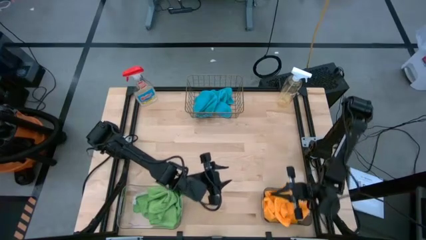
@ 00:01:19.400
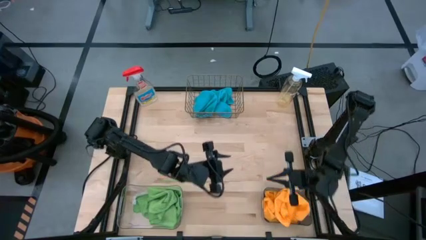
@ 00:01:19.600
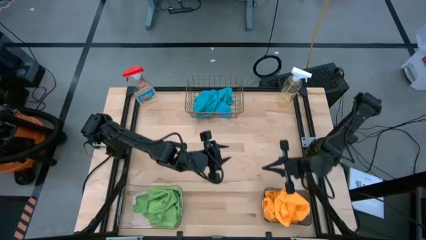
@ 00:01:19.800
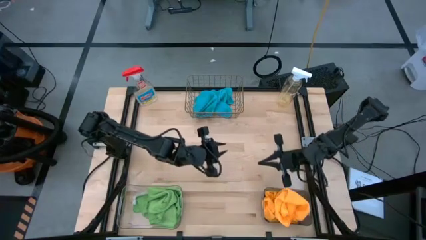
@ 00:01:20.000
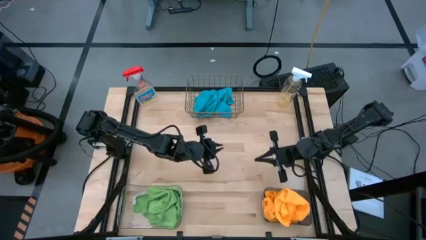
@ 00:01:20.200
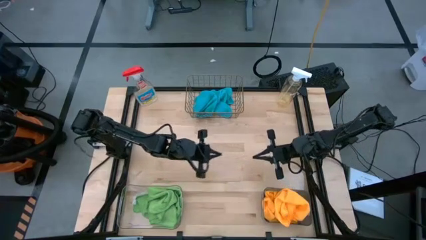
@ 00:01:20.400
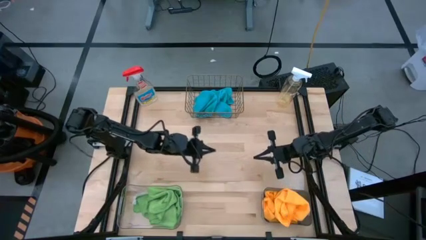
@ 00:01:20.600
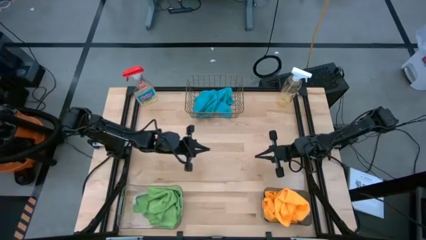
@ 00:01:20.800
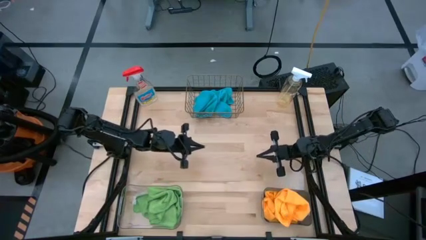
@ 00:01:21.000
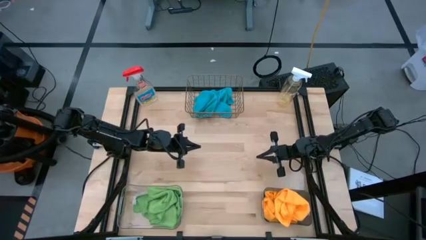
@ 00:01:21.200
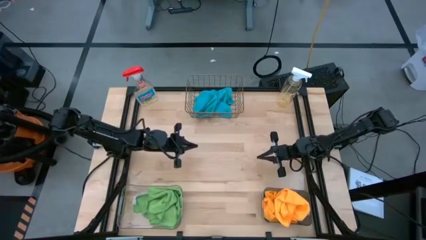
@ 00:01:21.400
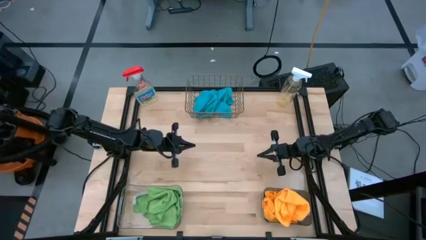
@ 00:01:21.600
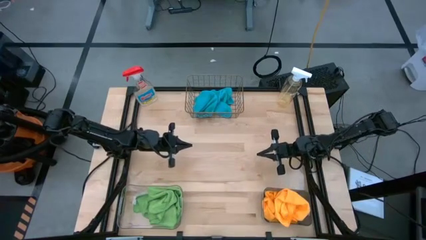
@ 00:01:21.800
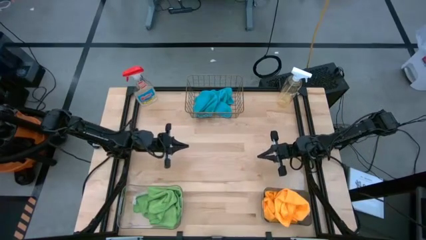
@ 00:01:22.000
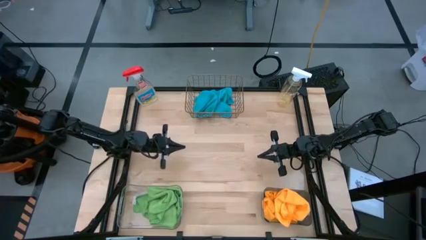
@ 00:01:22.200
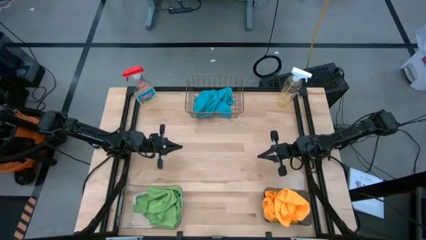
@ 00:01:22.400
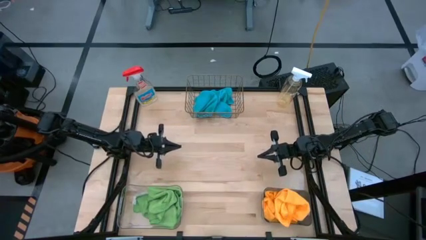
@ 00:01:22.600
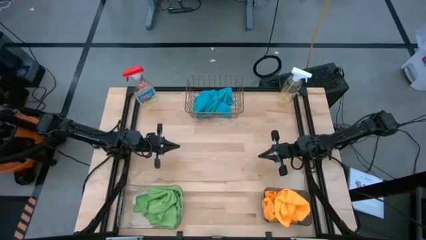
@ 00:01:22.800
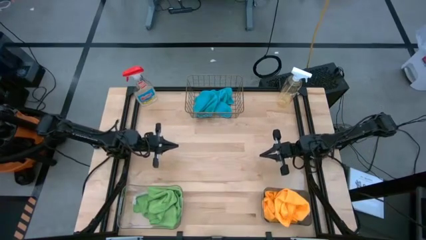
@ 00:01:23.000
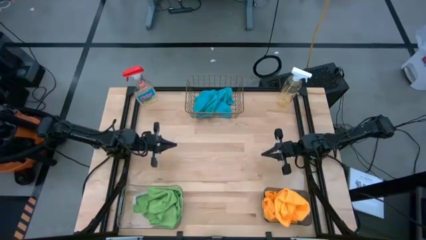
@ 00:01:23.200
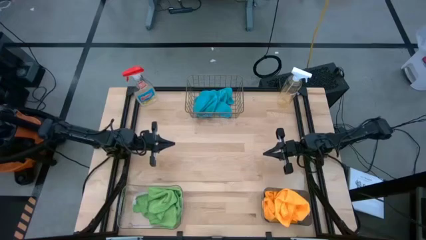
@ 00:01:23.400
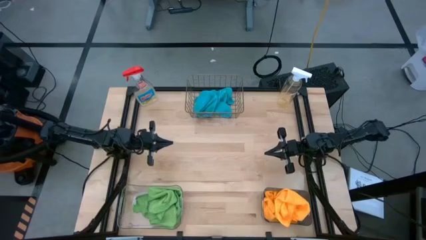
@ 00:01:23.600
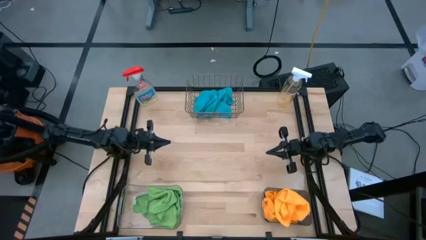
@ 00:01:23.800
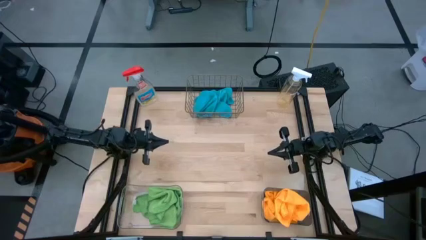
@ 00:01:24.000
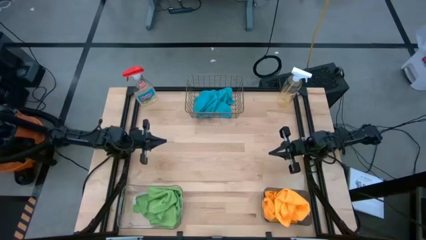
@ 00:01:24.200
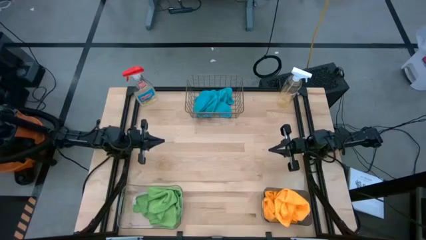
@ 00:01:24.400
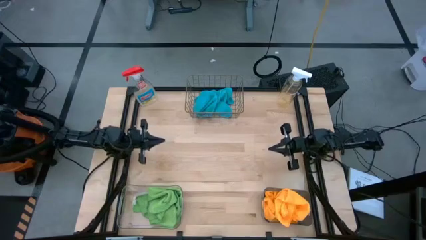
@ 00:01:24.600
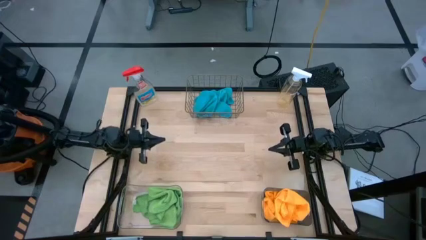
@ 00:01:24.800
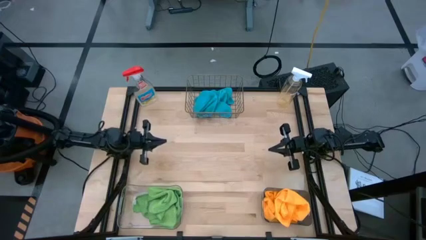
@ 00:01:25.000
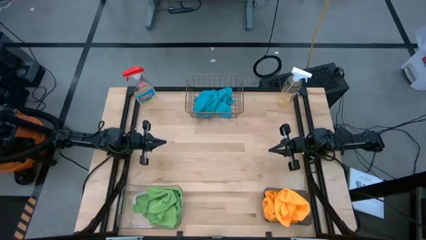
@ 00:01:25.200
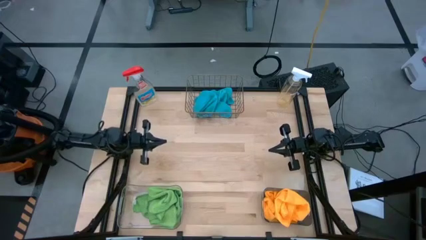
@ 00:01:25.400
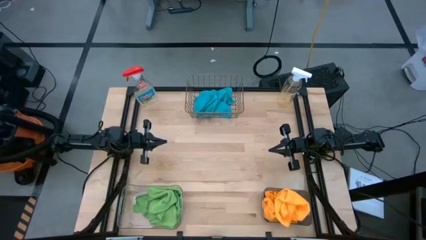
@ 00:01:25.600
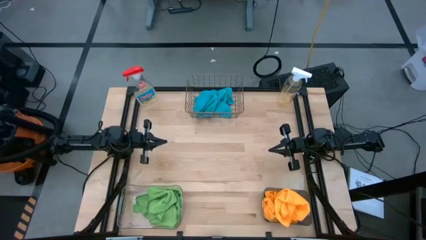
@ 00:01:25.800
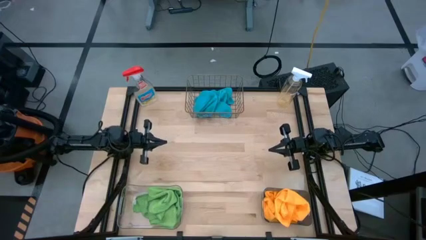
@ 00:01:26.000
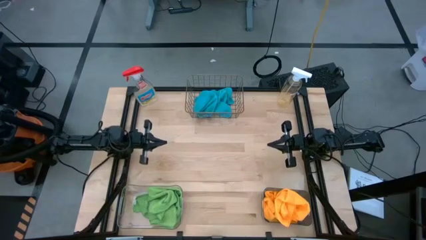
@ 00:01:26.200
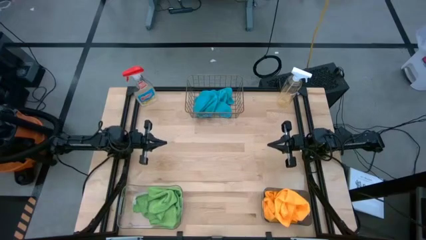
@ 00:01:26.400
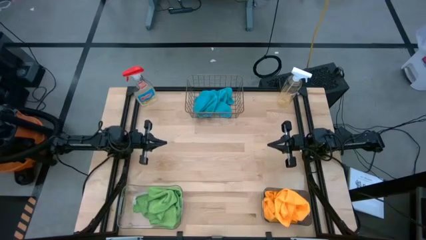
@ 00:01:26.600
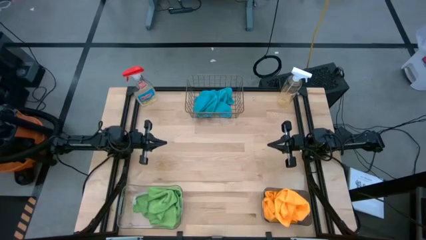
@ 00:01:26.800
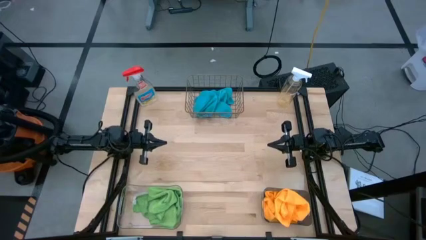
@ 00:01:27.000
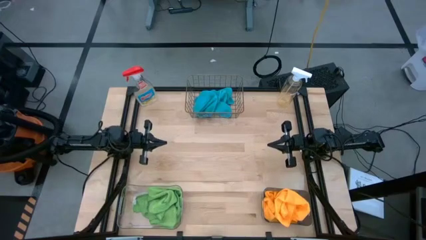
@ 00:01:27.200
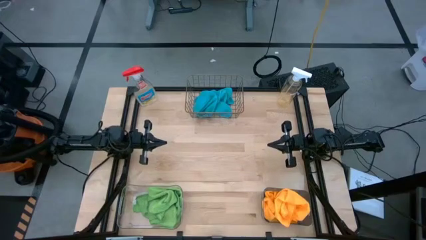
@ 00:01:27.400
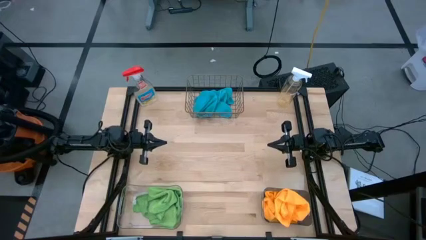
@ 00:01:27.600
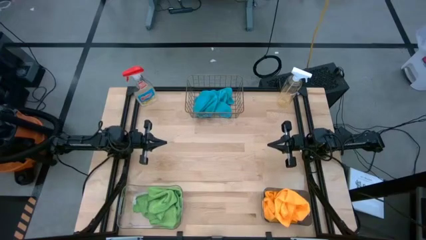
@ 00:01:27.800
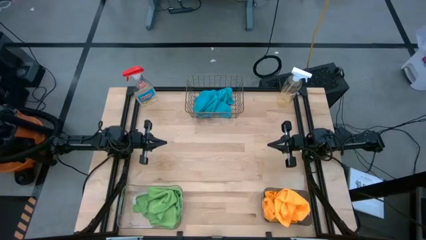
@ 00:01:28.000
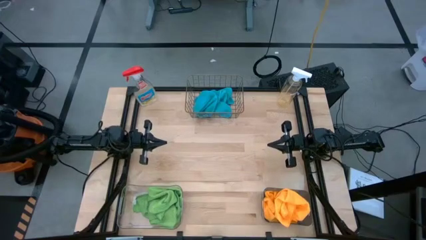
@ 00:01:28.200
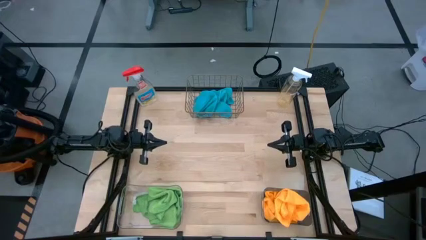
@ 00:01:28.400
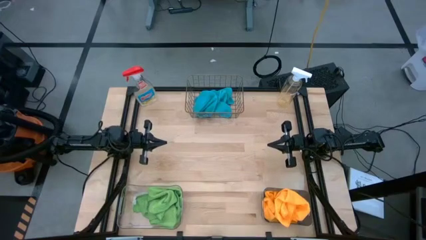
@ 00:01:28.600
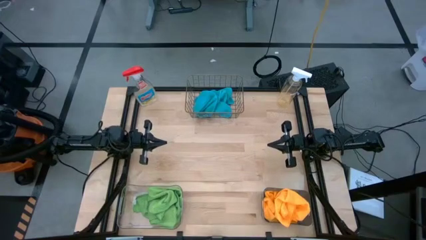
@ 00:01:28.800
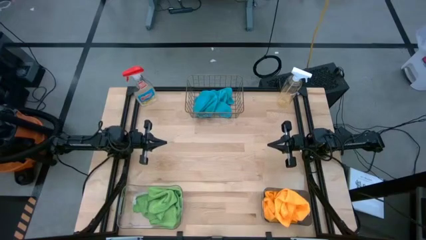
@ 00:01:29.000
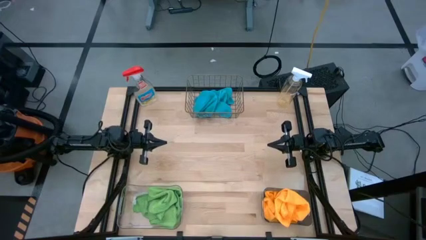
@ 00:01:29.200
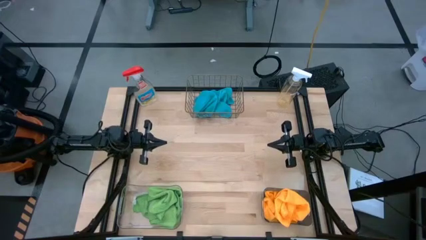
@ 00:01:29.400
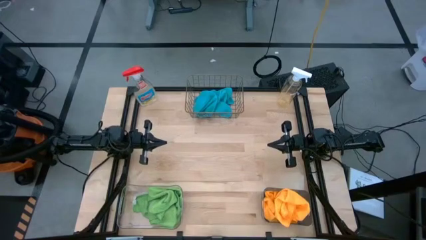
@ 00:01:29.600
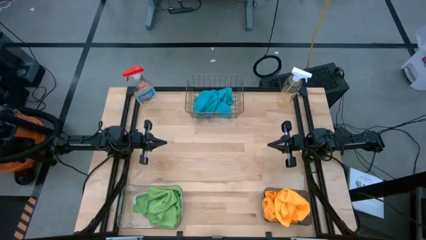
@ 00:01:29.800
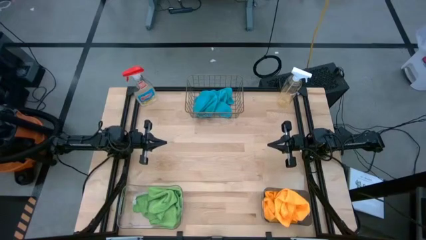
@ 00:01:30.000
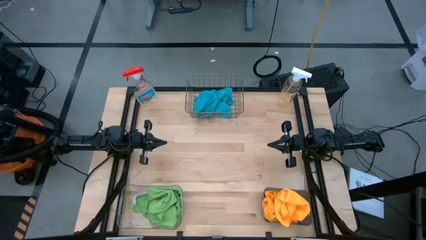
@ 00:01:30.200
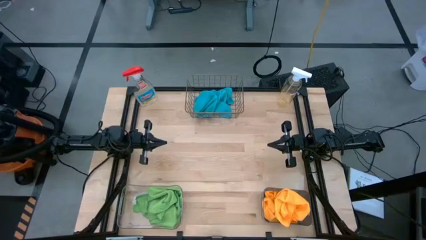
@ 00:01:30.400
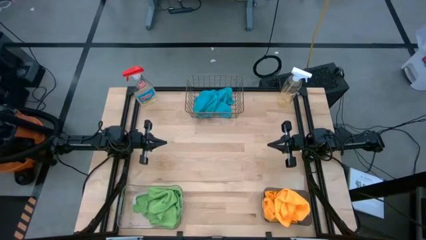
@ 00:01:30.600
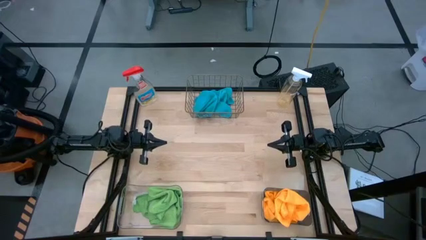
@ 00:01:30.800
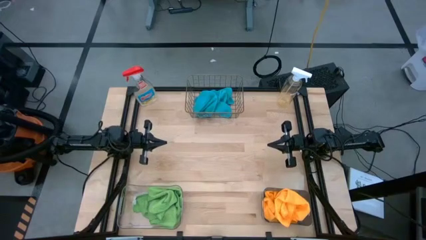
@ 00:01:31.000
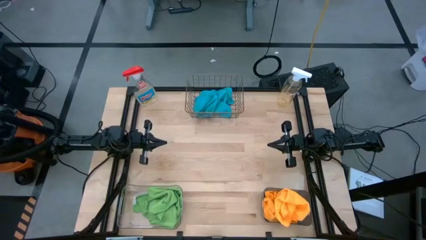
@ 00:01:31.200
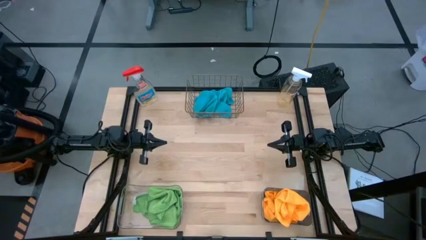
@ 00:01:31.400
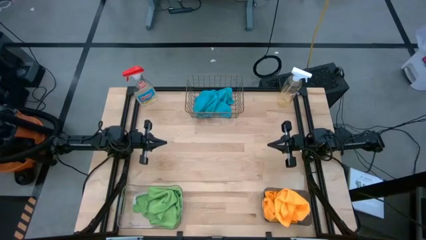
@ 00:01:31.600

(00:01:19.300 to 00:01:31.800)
Task: Sort microfiber towel by color & place in baskets
Return to Home Position
